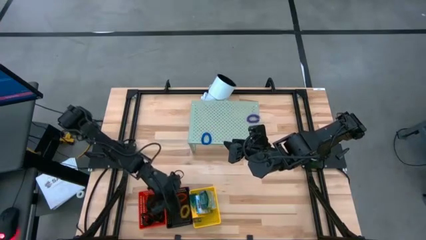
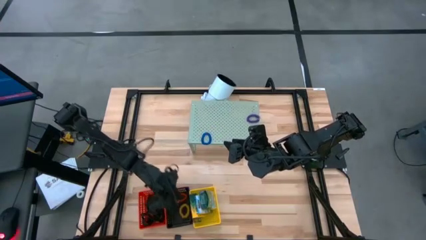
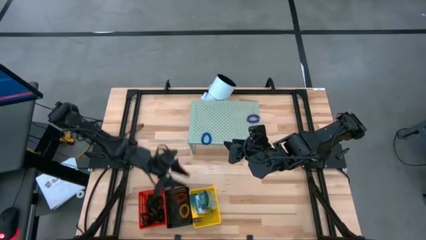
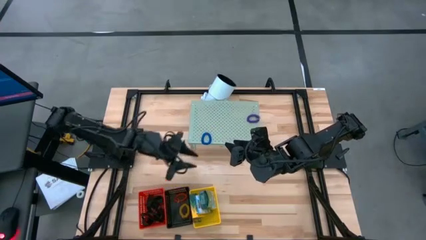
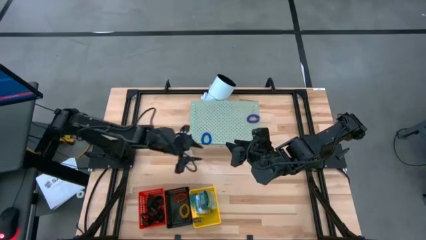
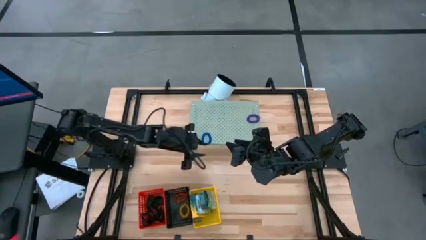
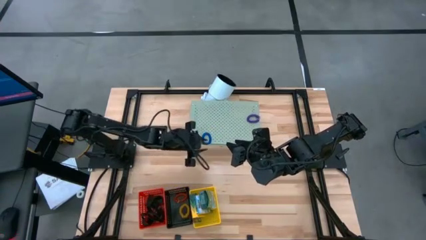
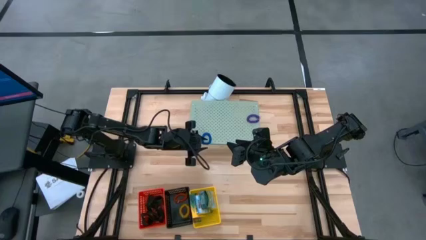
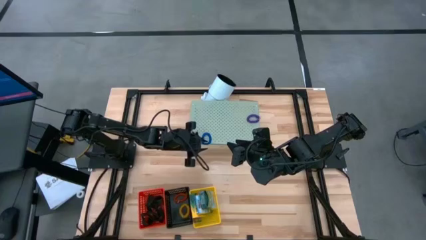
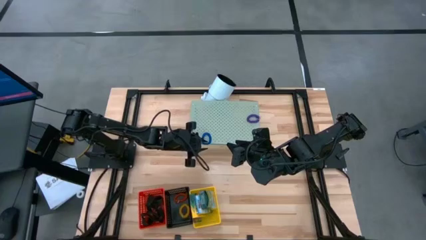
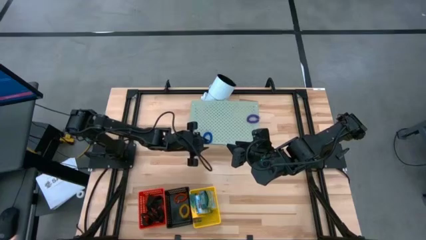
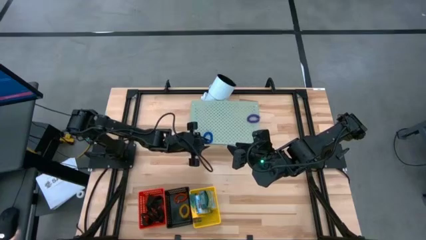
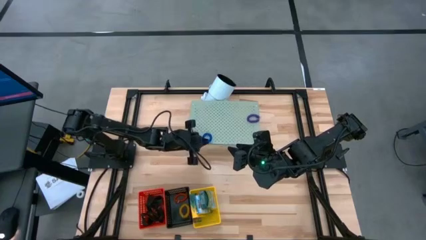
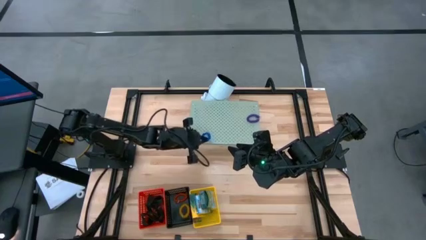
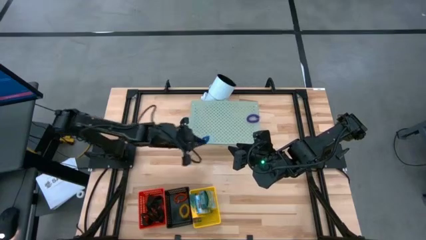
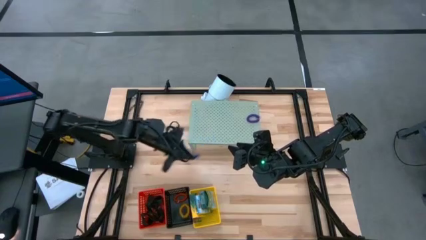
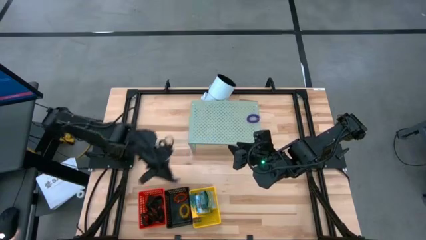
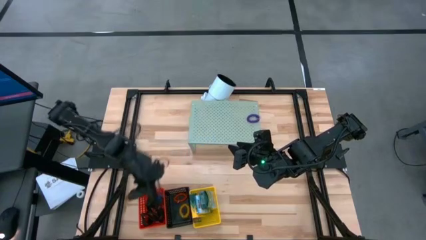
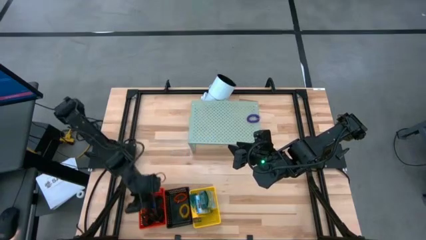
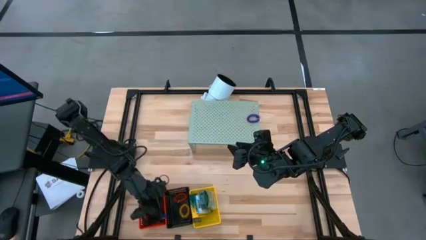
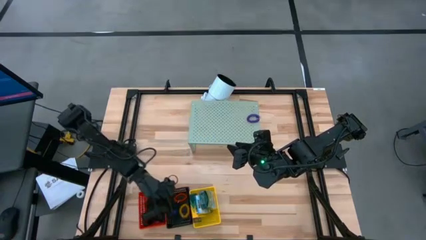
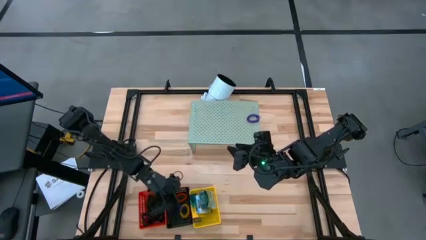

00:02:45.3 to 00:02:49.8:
Task: Pick & Place Office Desk Supplies
Put the blue spring keychain into the black bin

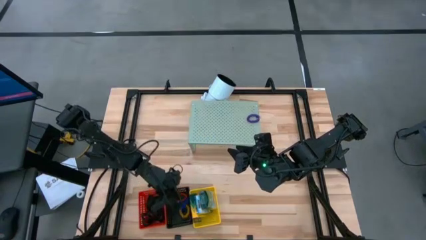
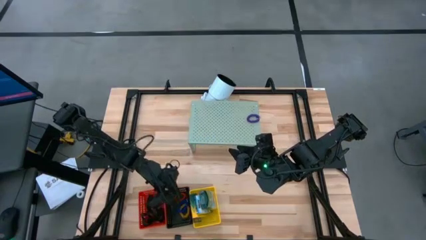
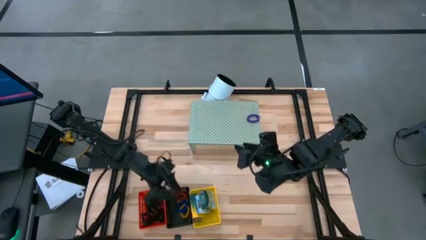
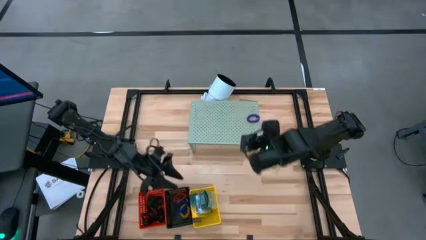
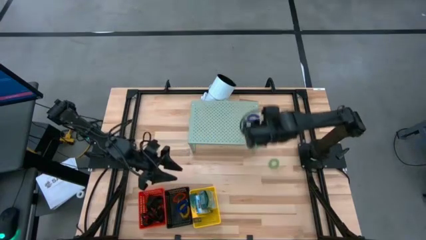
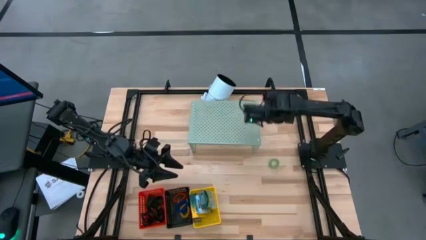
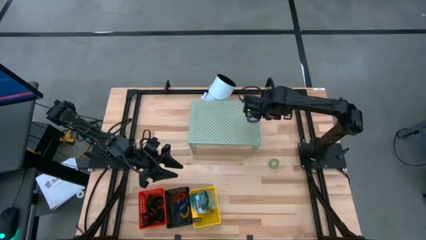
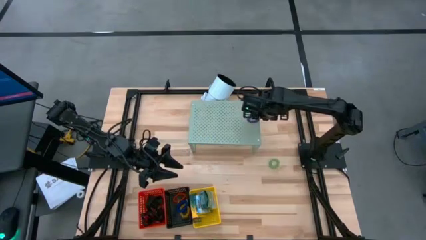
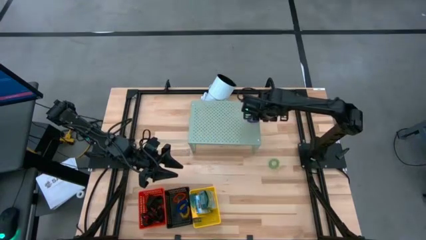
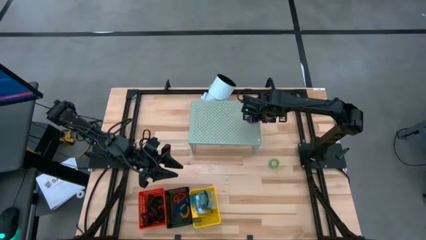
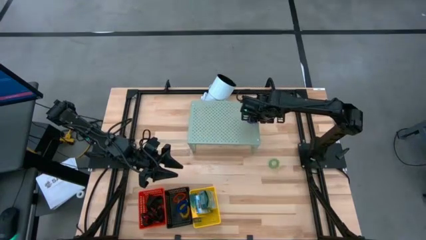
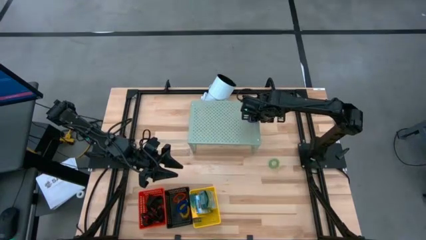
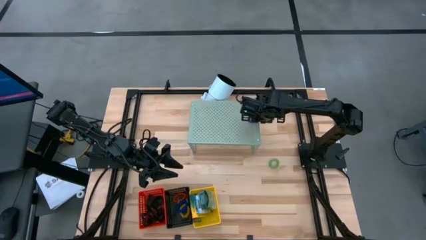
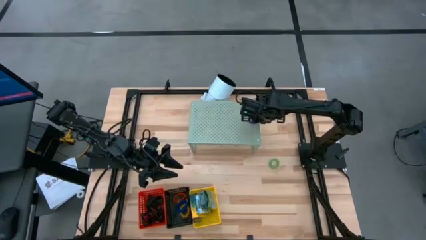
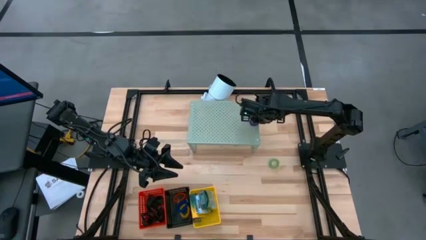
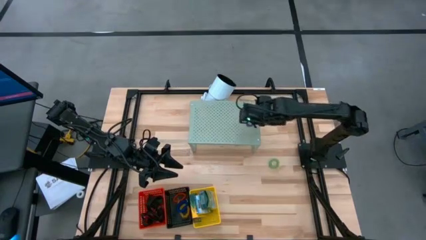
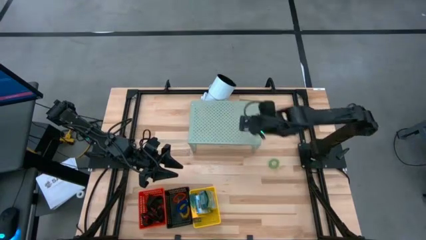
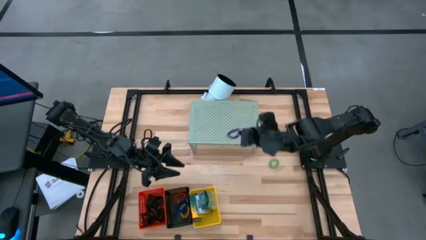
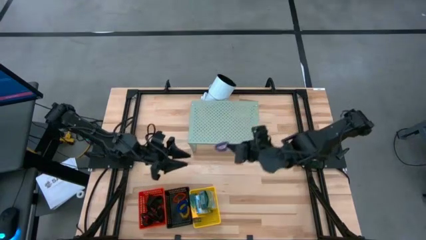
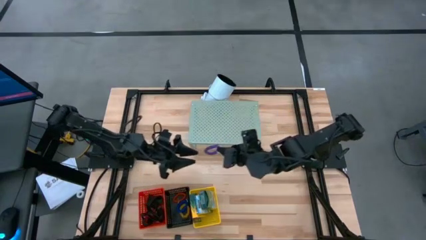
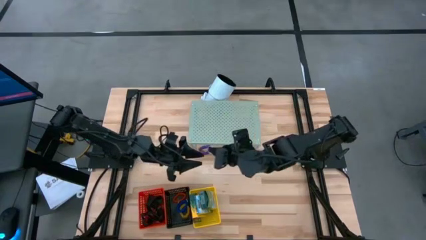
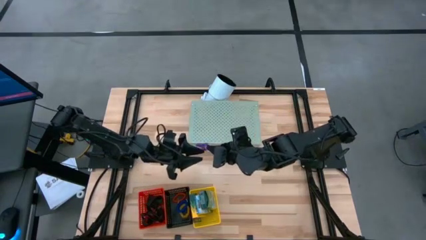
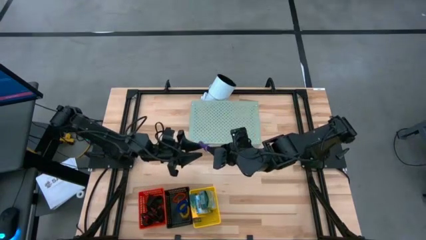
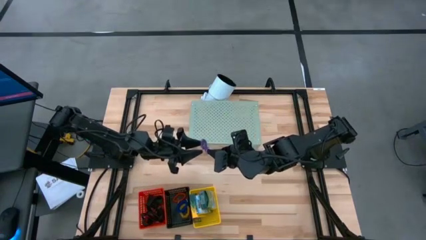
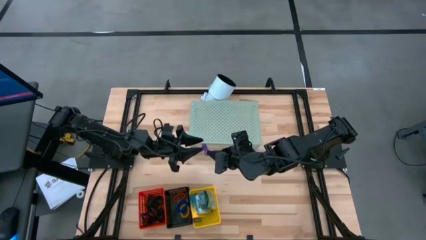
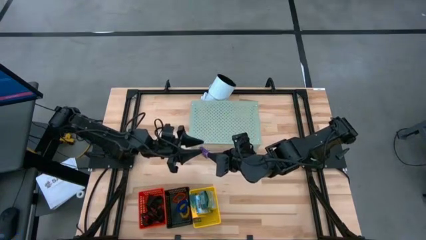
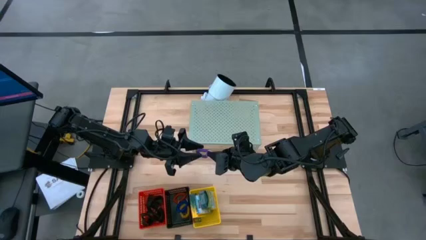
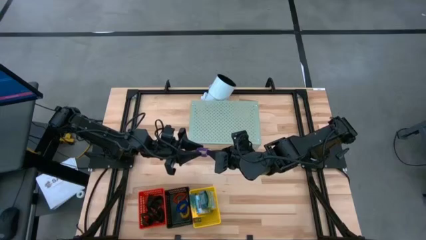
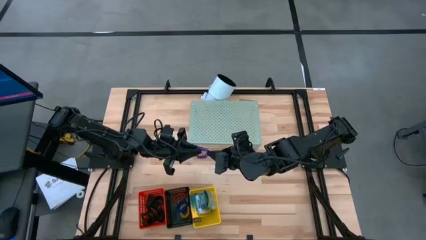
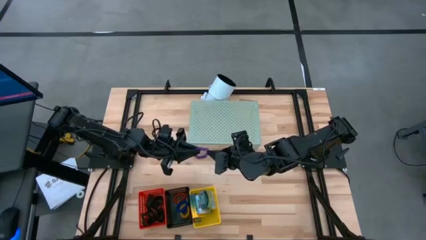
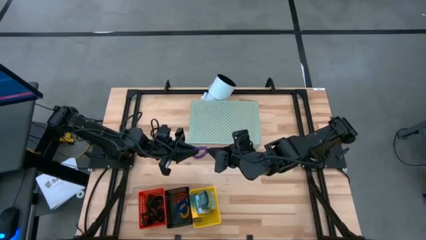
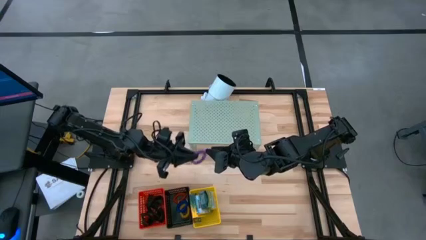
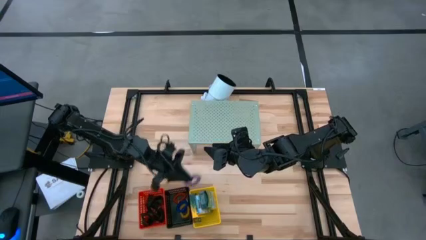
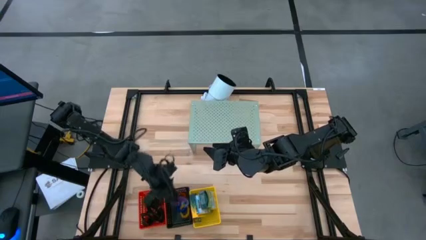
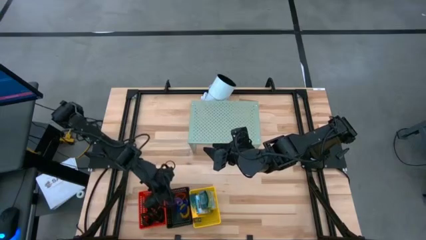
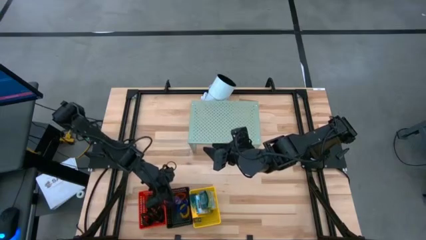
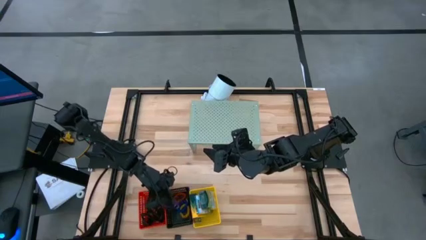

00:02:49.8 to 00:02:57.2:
Put the violet spring keychain into the black bin

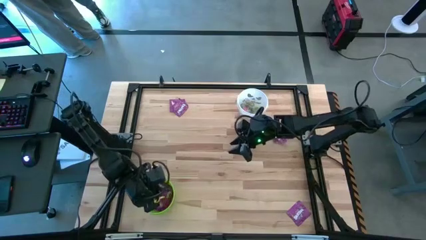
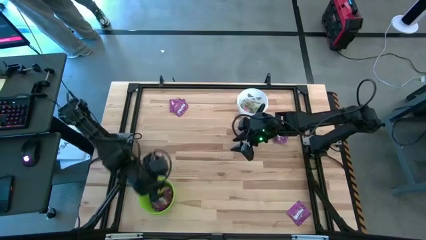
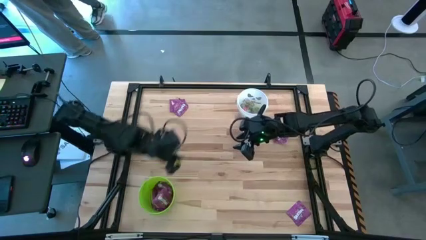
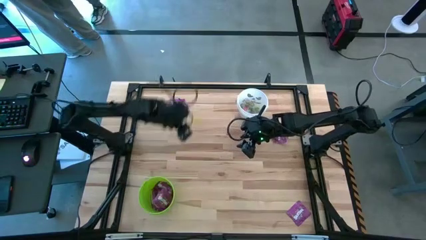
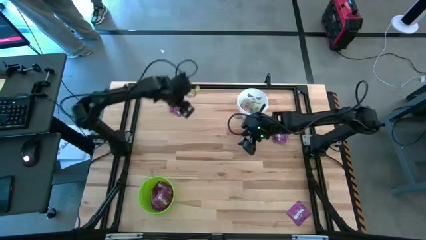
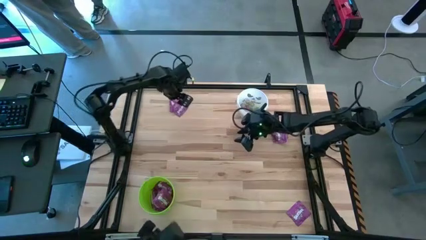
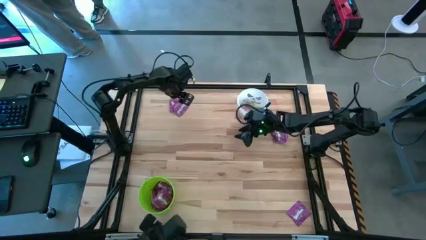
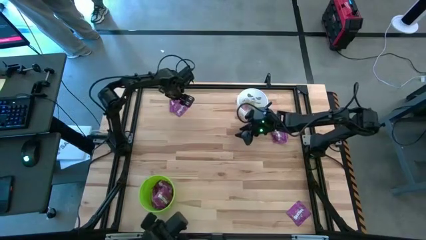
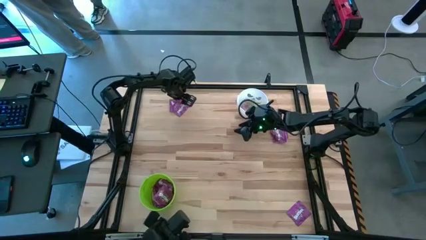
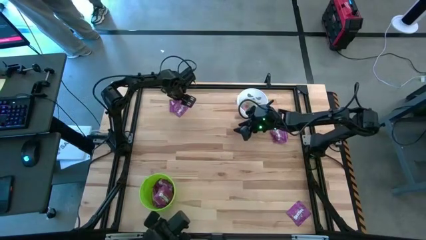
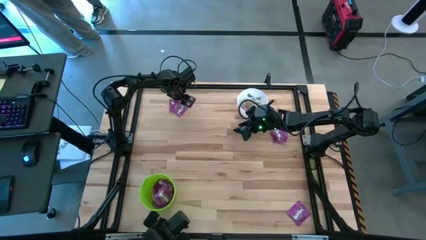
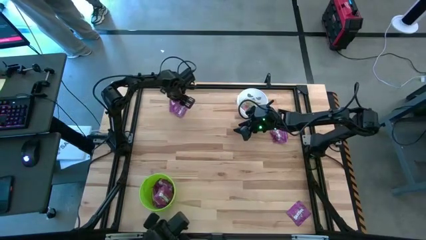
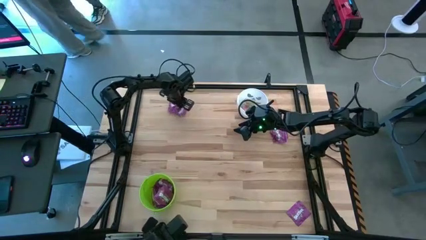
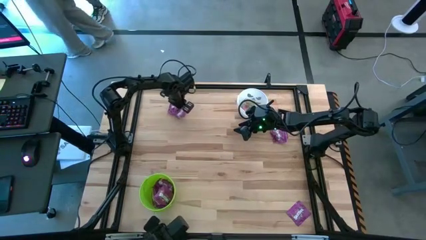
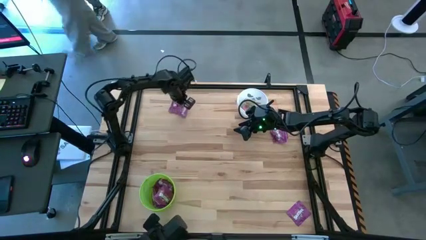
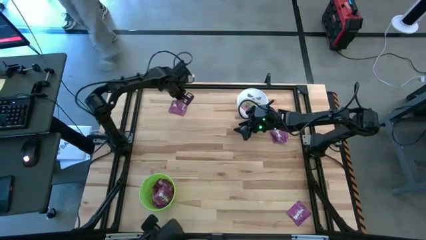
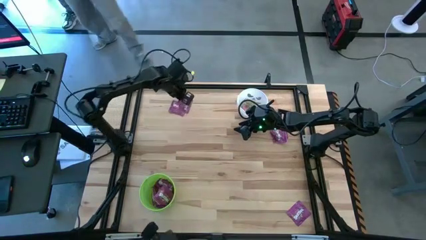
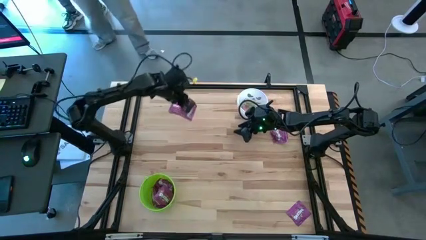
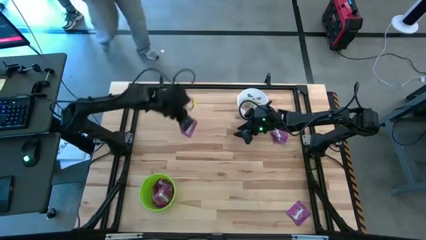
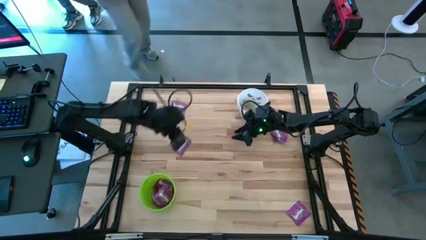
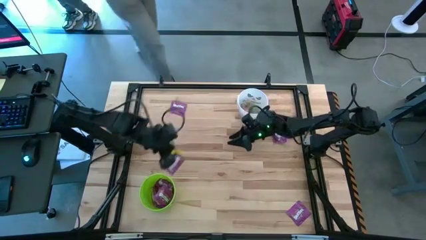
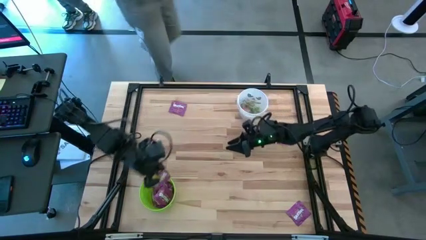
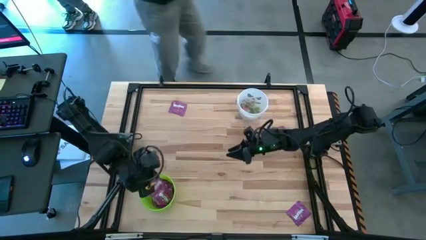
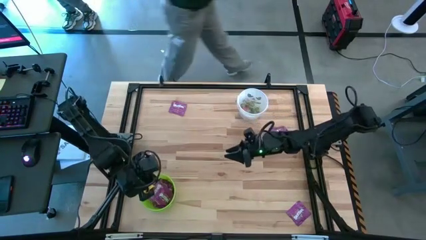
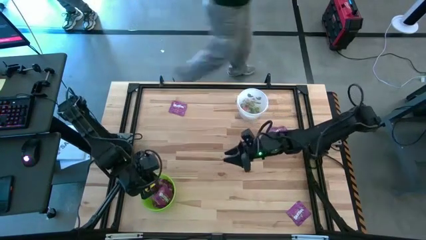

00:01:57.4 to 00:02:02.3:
Task: Sort candy by brand, put in halloween buckets
Put the purple candy into the green bucket
